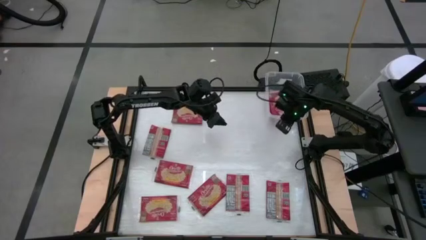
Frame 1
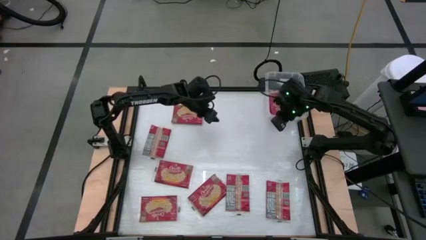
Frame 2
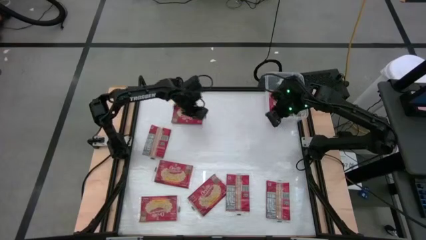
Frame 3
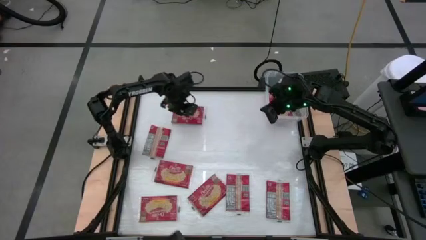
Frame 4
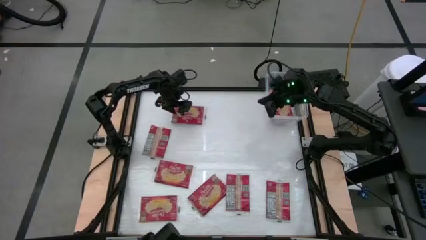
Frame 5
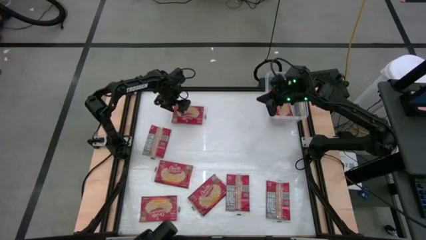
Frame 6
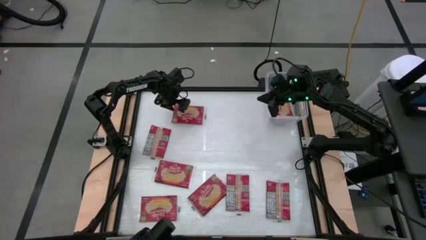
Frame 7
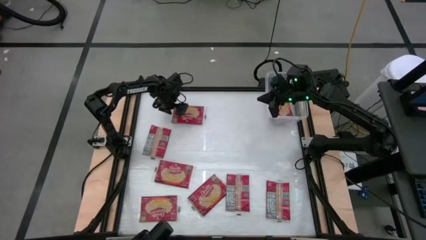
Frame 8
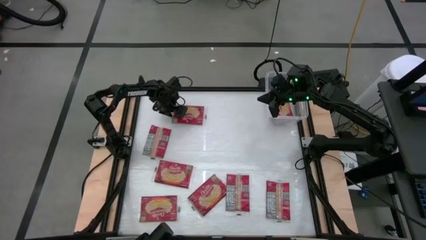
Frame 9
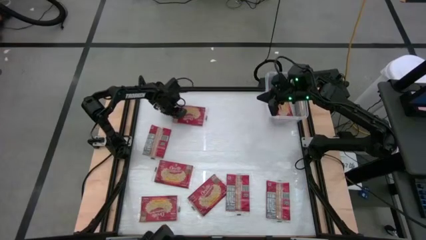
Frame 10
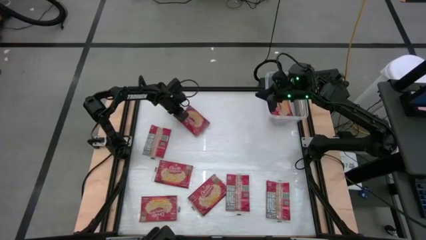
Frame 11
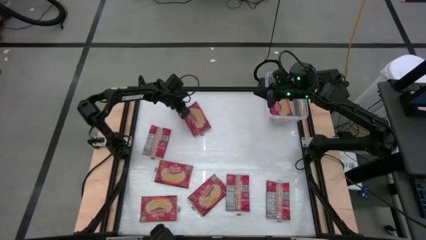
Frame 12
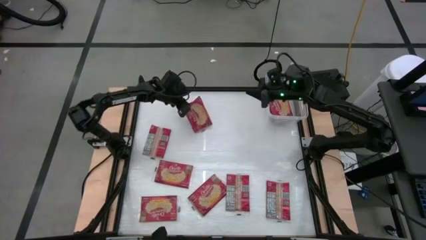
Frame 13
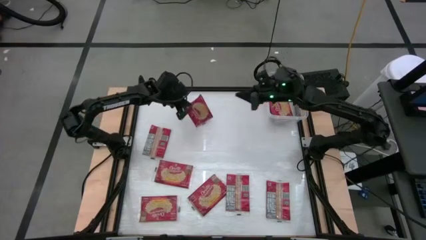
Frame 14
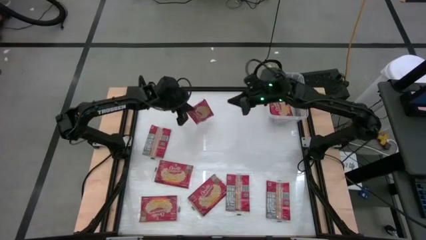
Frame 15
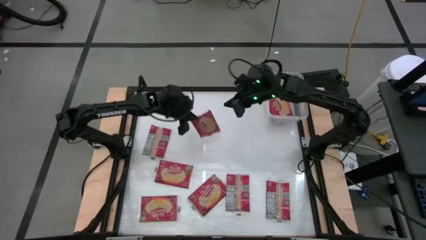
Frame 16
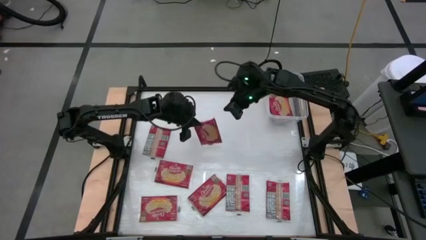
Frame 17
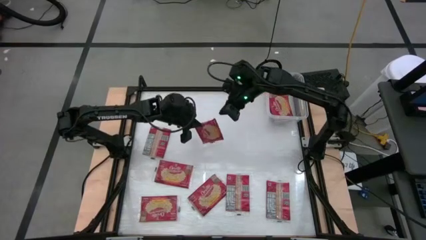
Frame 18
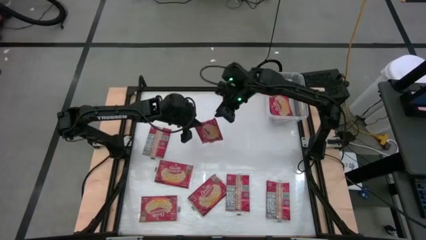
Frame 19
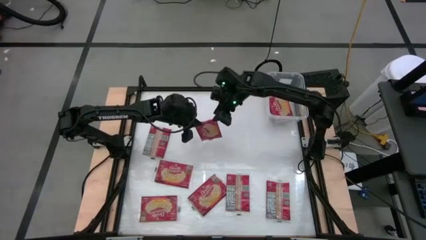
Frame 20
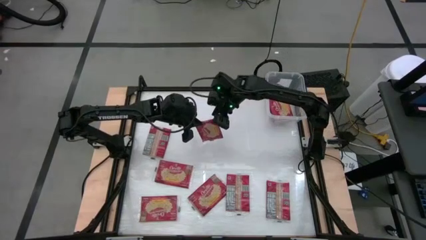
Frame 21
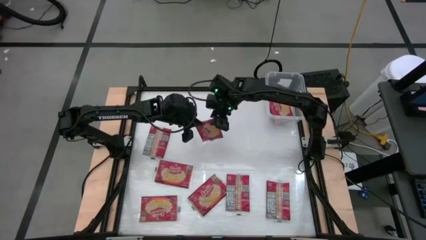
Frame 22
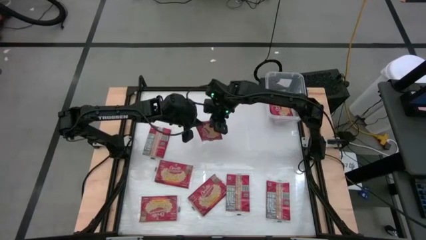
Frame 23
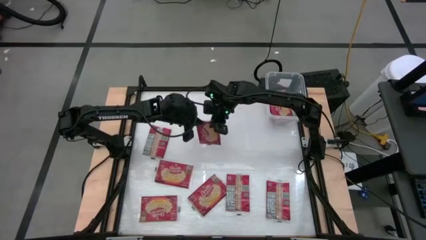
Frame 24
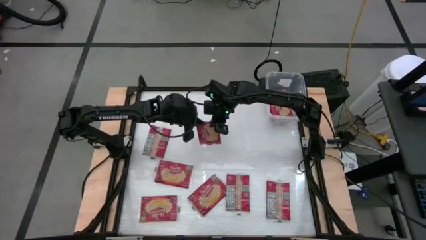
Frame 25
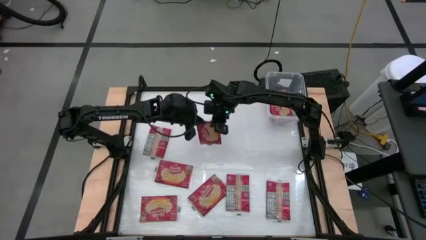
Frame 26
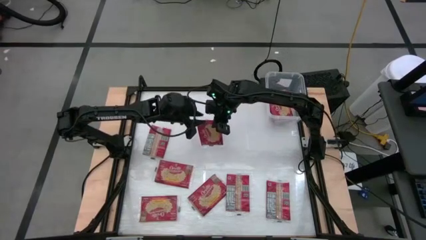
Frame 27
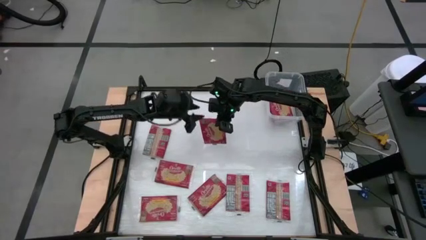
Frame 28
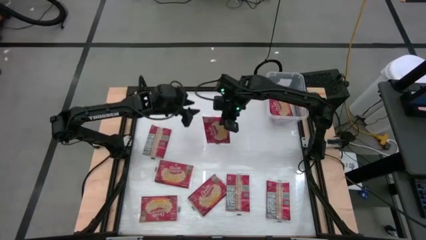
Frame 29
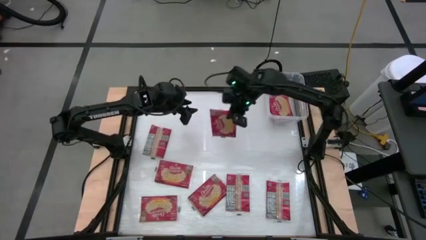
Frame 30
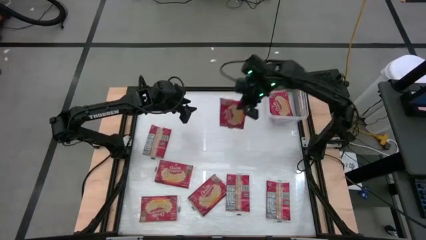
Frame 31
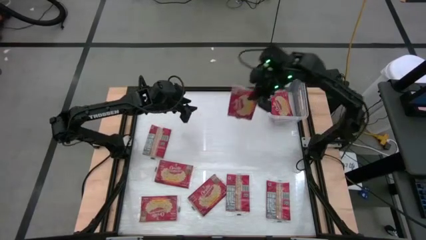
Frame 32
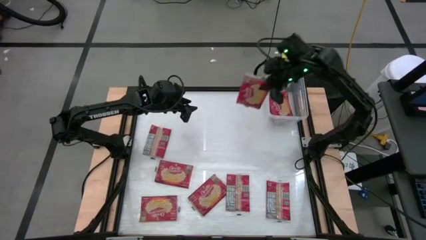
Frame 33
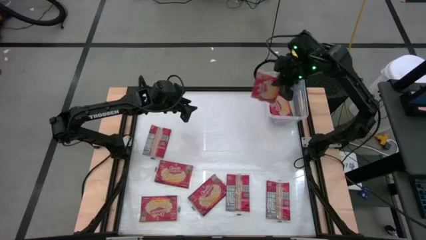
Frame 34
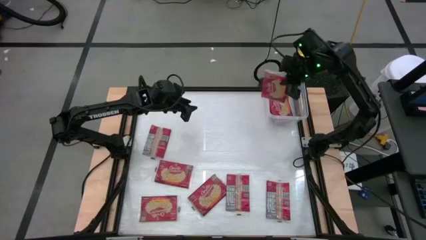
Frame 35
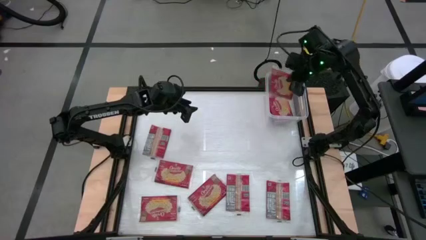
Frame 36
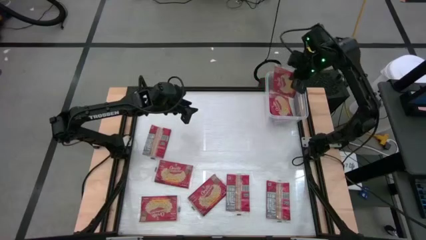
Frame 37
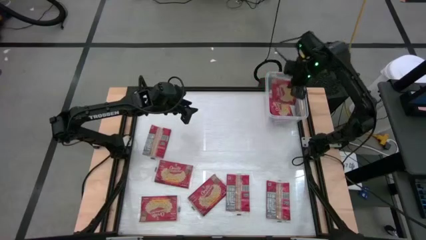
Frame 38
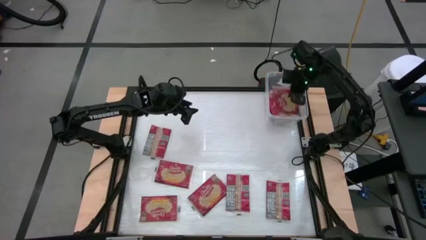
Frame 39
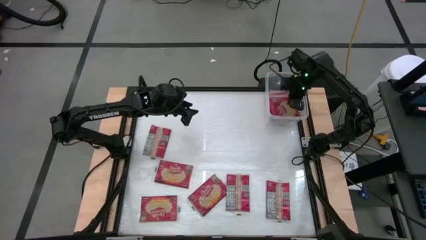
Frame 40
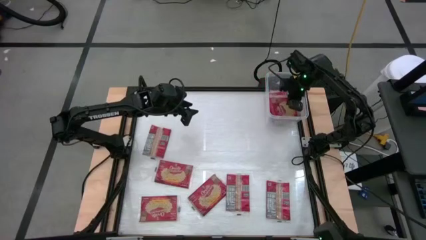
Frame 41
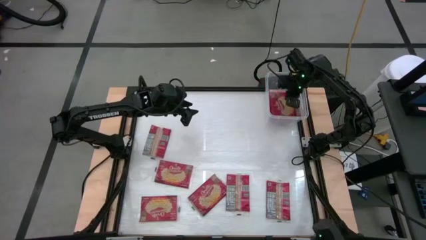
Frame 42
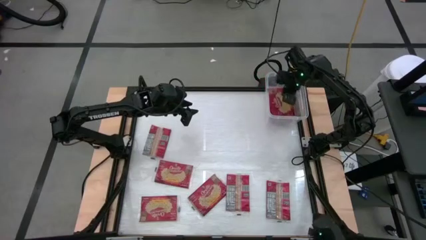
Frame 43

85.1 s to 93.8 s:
Task: Sort popcorn bags into baskets
Put the red popcorn bag into the transparent container

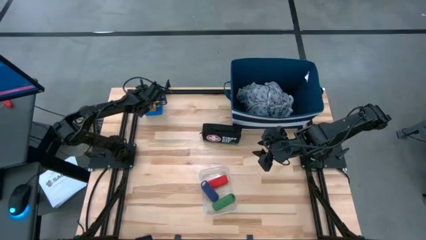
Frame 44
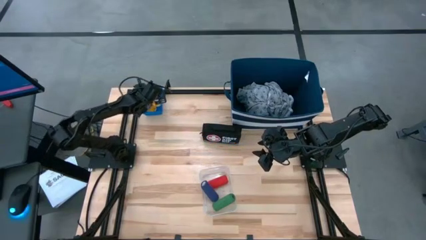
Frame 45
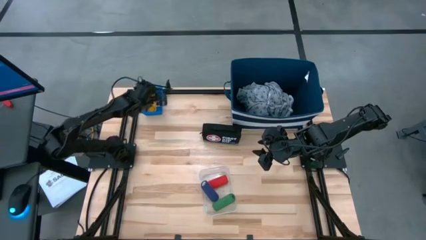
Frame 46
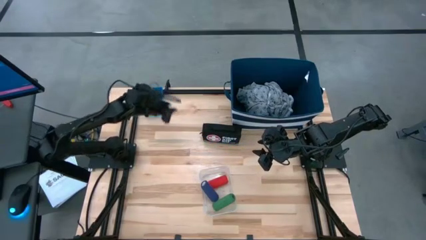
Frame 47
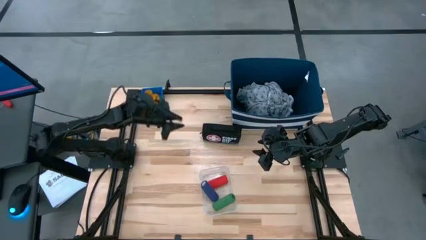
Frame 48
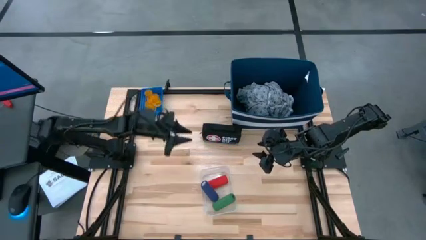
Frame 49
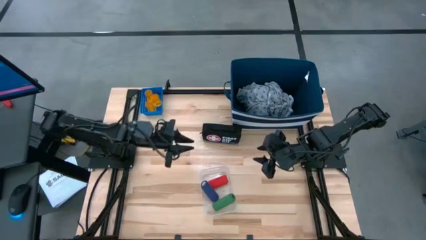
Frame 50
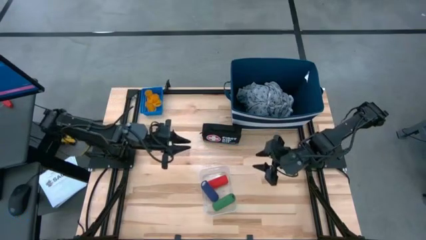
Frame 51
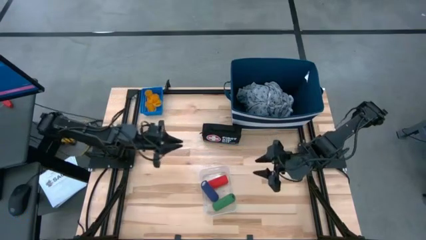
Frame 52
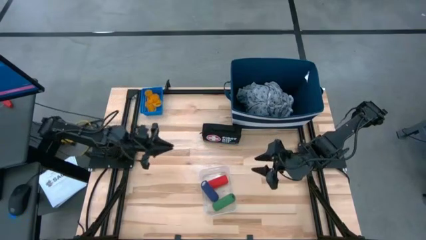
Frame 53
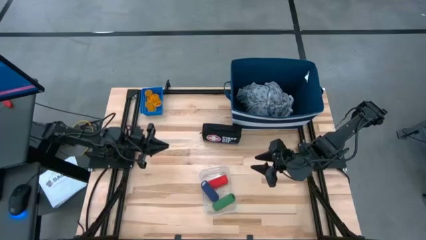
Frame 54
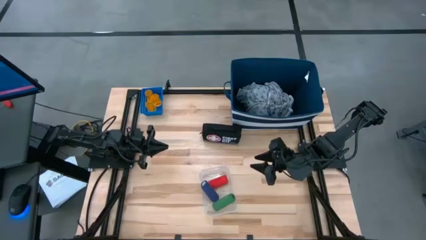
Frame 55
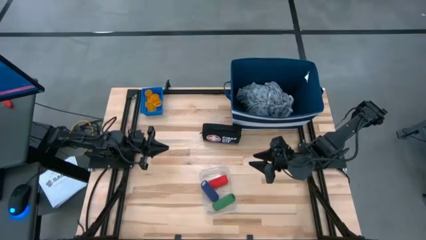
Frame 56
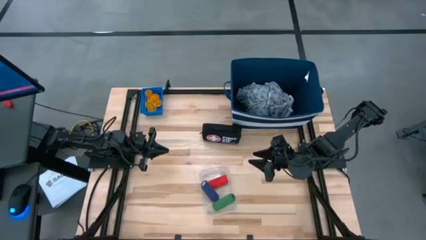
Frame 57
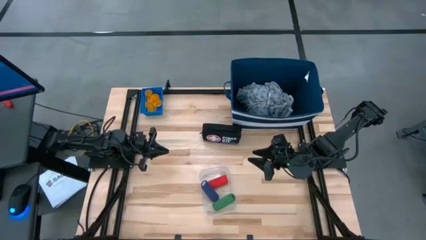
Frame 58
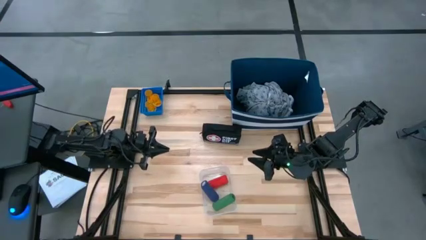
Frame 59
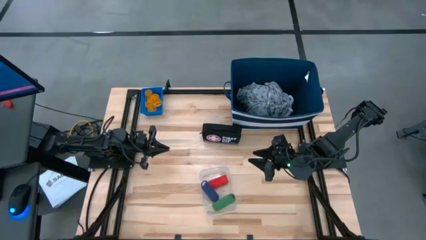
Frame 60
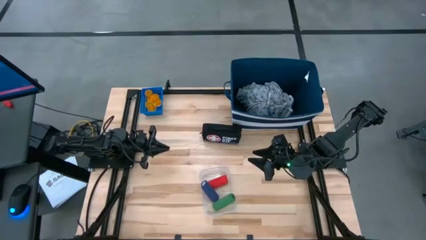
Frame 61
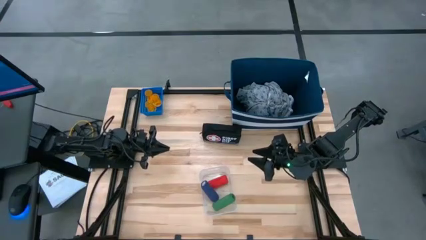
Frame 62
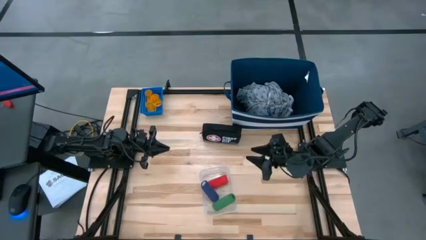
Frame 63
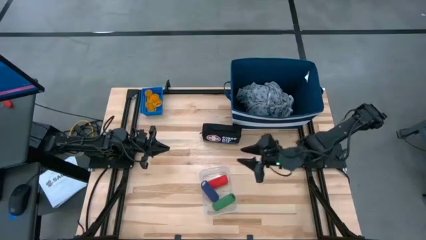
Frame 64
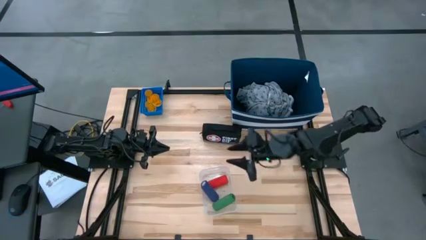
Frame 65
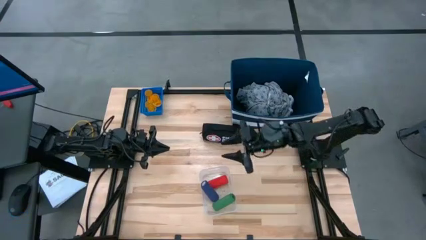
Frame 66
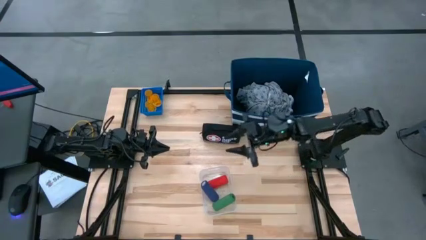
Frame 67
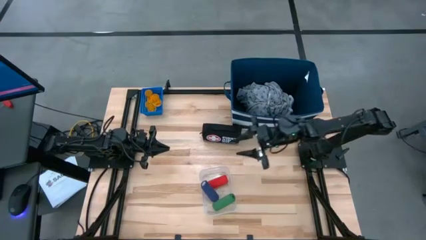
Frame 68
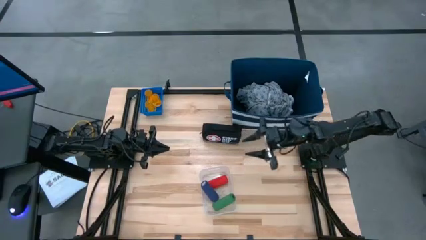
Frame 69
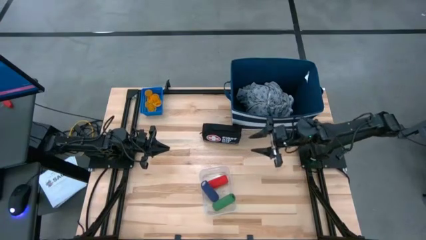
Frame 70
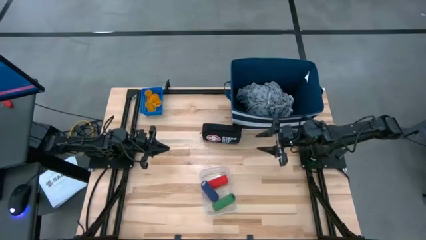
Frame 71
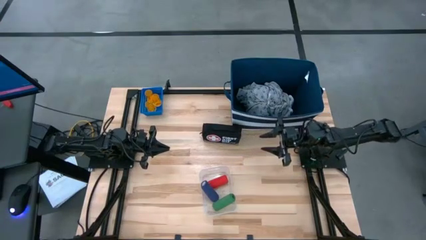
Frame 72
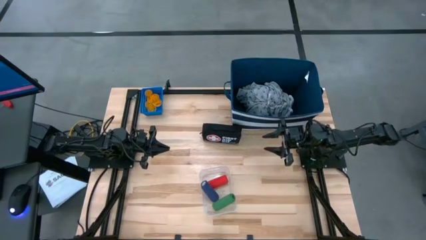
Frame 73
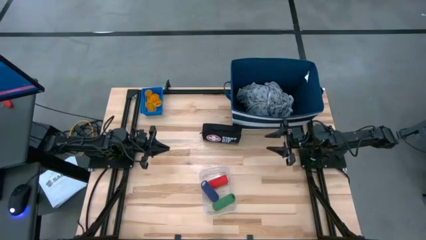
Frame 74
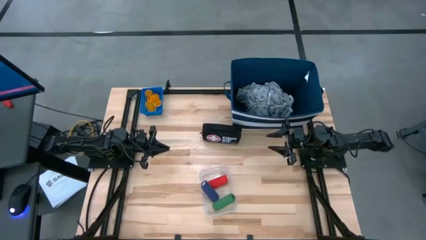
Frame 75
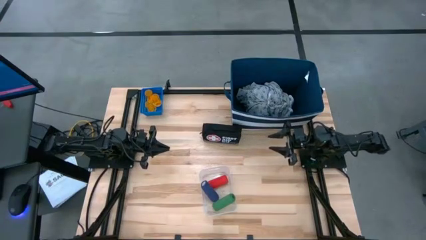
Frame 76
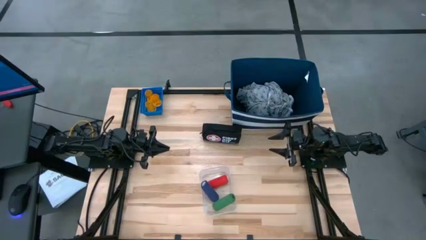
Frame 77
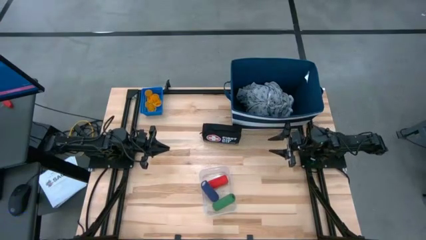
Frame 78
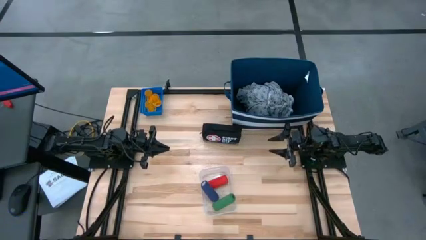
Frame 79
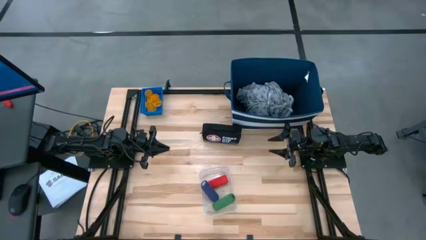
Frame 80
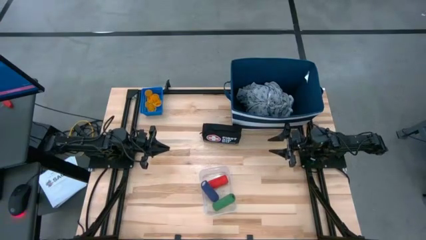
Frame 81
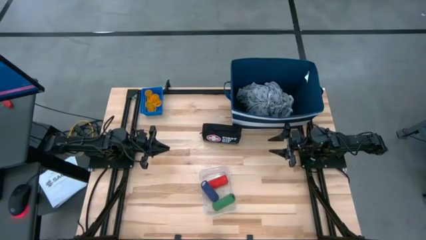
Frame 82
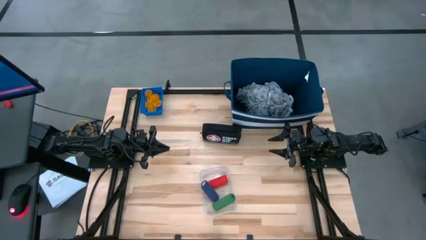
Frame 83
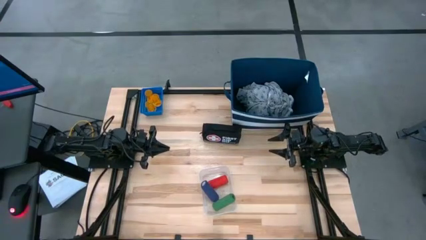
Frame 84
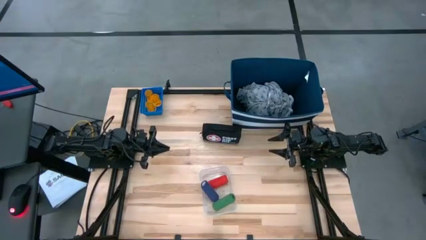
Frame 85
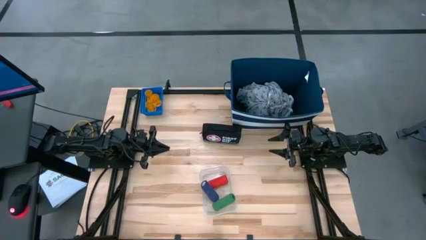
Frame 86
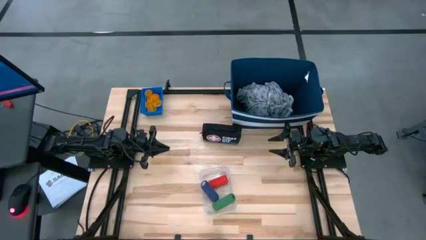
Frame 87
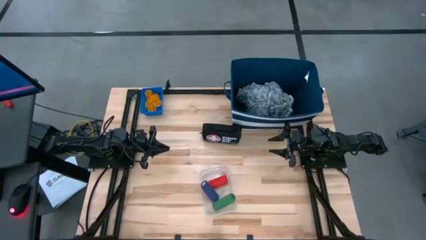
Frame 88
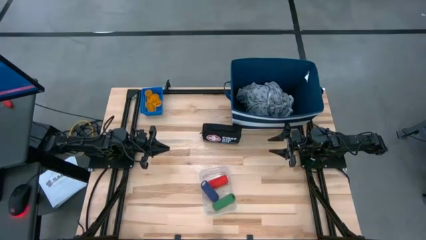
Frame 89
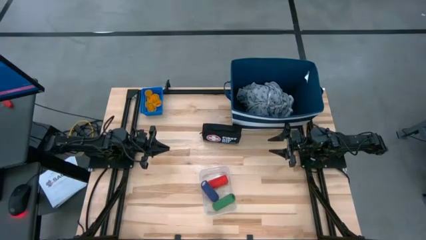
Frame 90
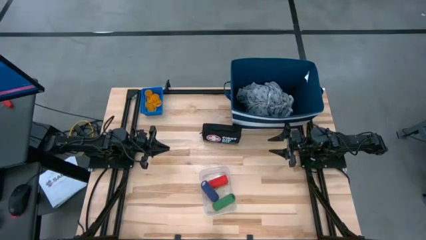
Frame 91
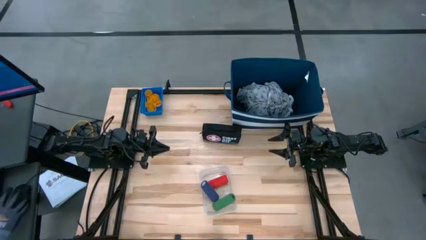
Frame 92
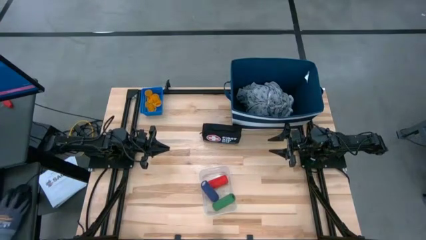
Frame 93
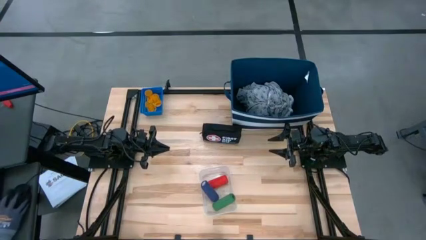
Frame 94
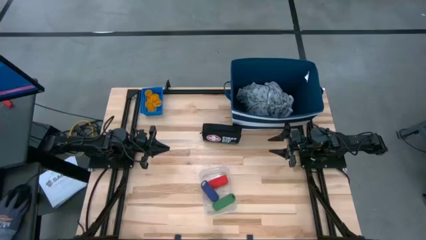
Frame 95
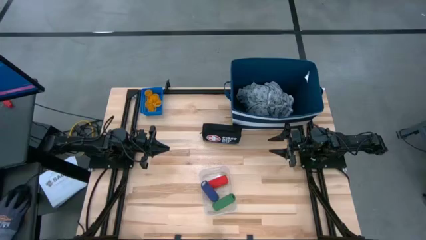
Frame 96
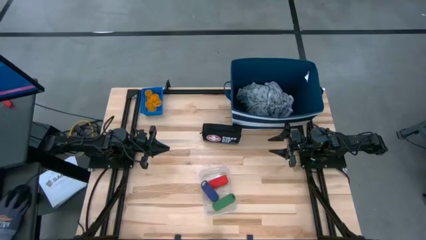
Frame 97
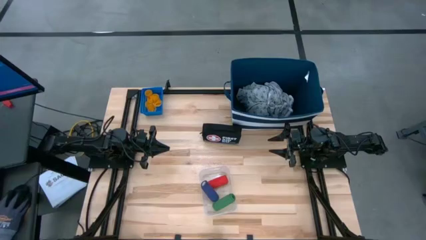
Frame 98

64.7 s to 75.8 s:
Task: Pick & place medical supplies in basket/bin
Return to Home Position
